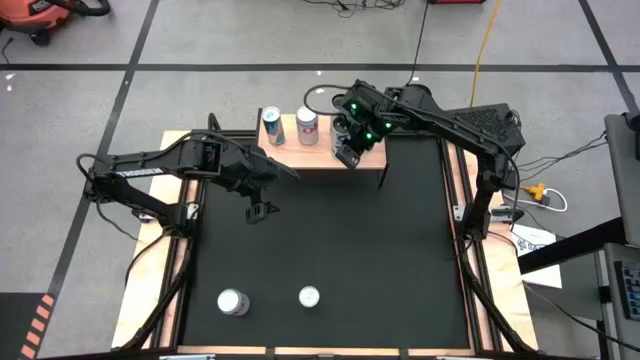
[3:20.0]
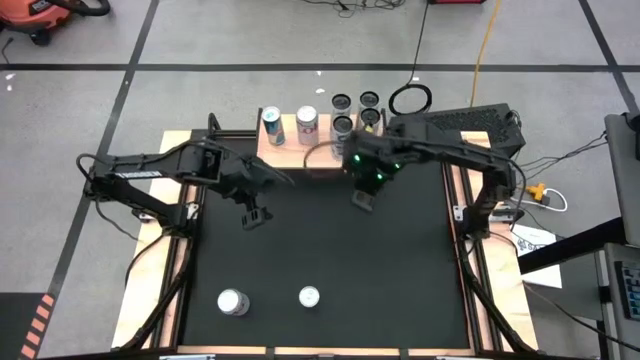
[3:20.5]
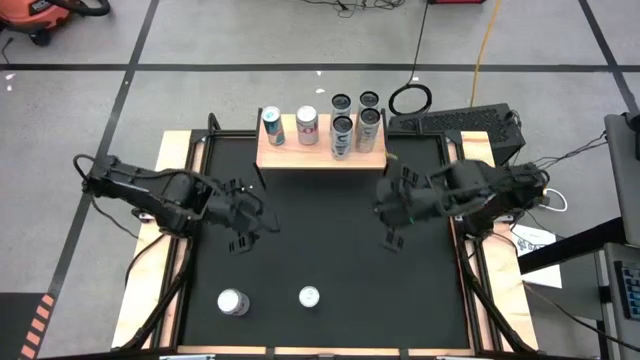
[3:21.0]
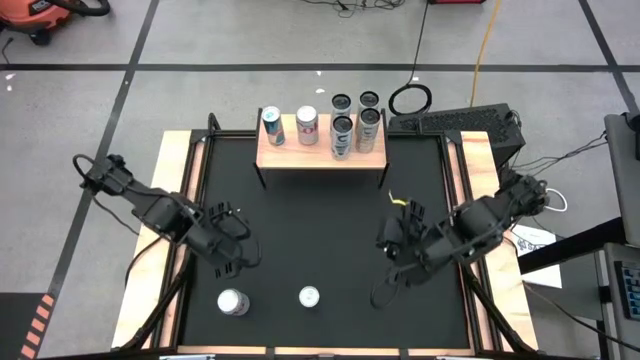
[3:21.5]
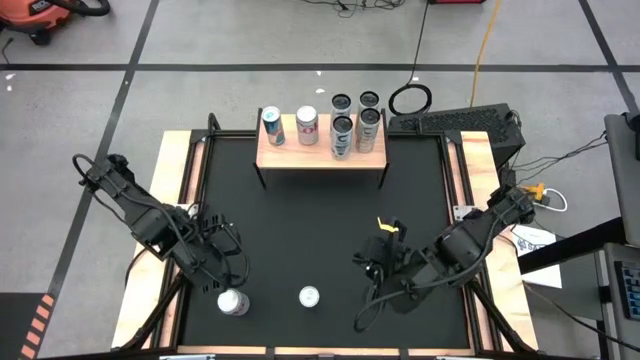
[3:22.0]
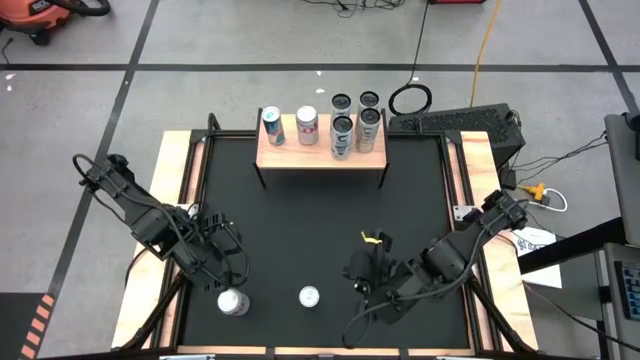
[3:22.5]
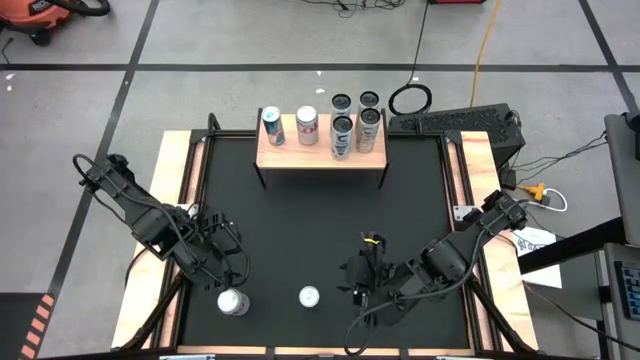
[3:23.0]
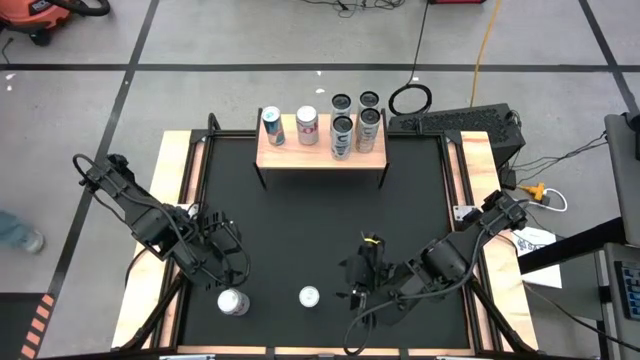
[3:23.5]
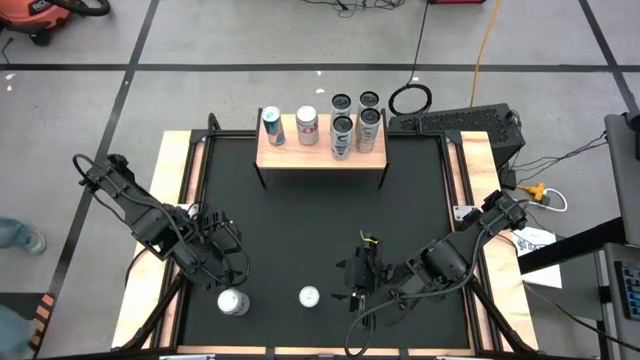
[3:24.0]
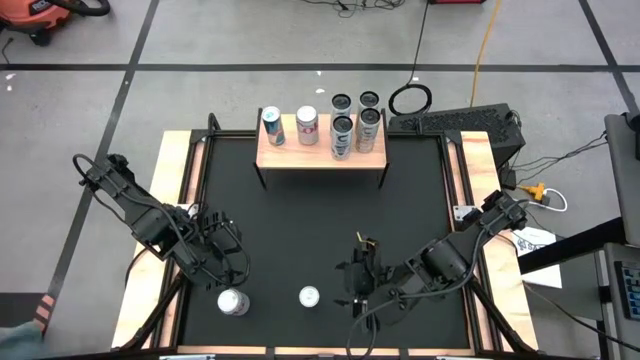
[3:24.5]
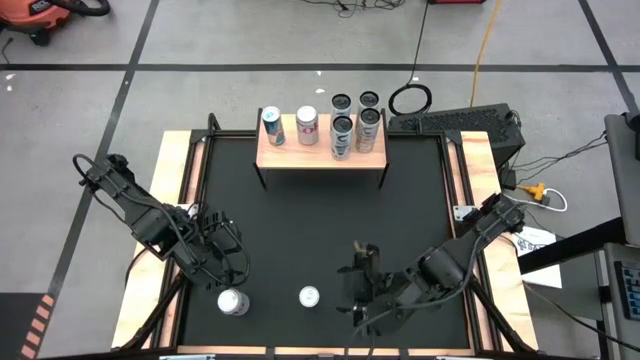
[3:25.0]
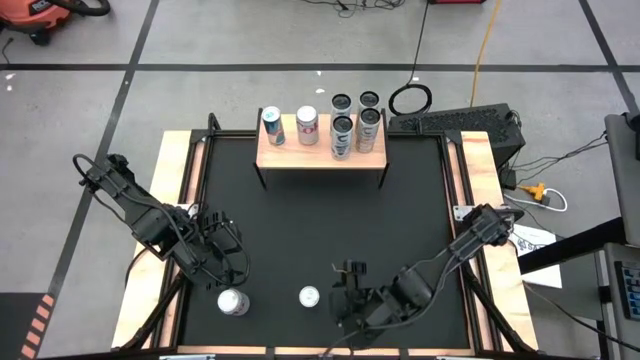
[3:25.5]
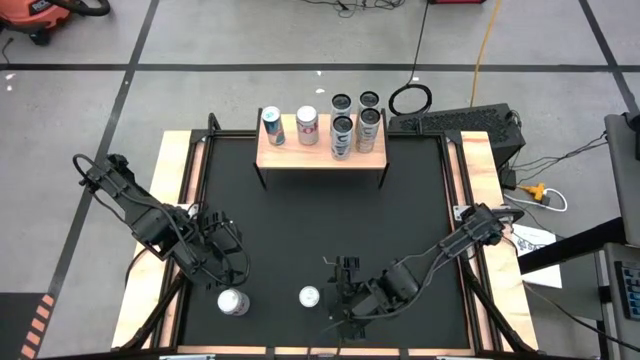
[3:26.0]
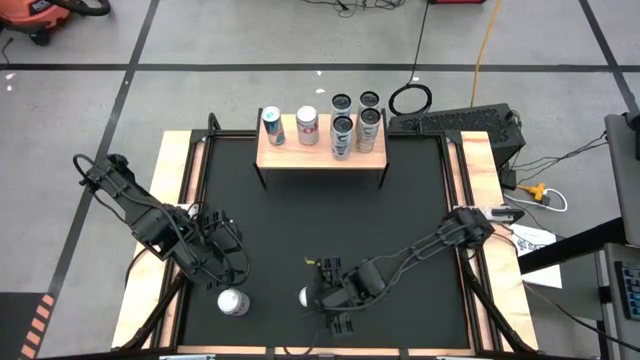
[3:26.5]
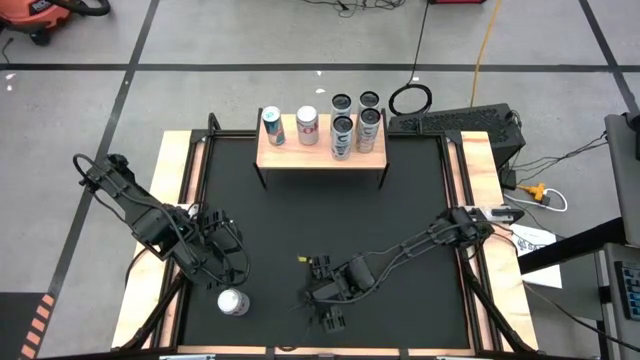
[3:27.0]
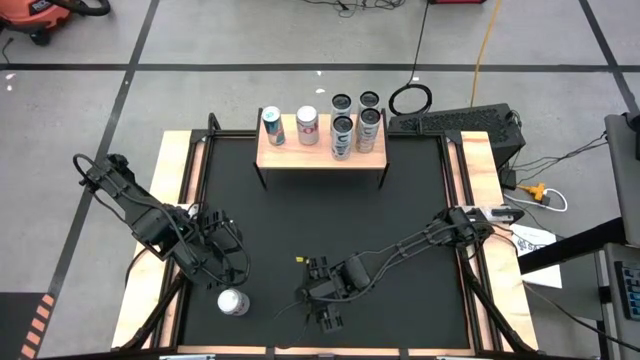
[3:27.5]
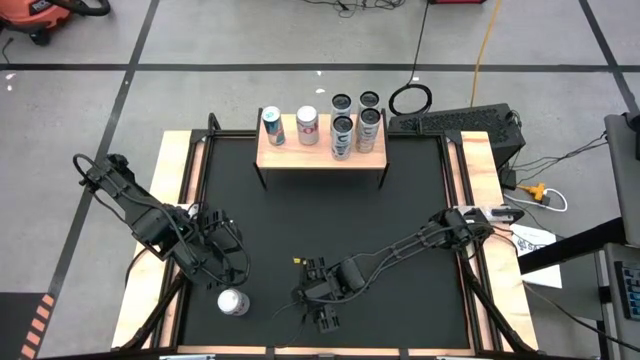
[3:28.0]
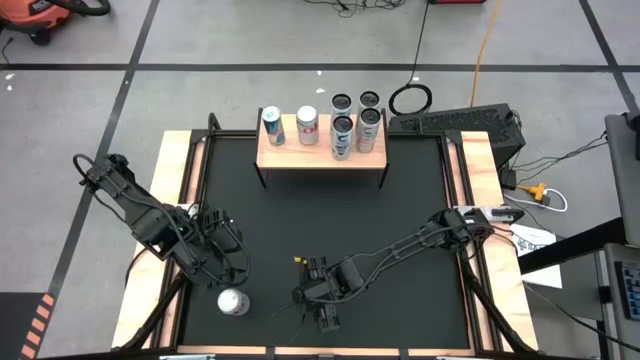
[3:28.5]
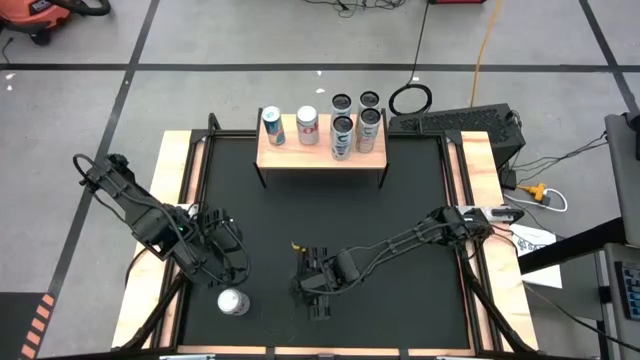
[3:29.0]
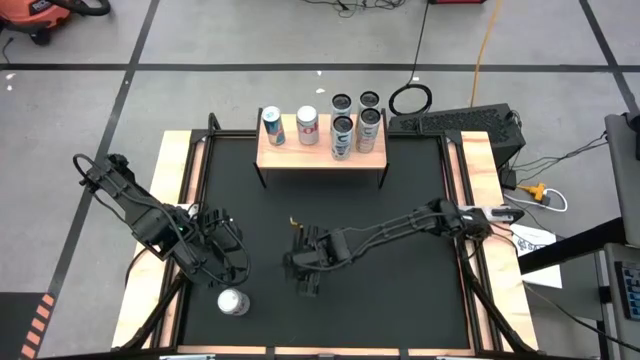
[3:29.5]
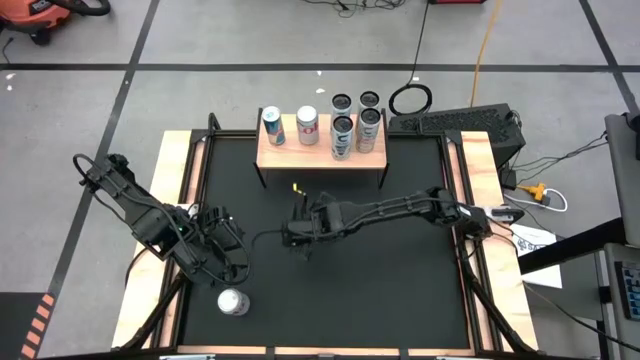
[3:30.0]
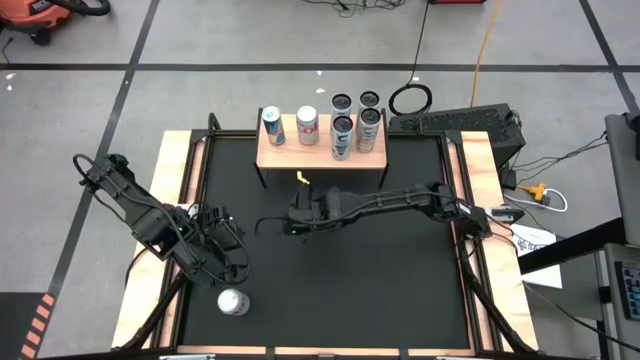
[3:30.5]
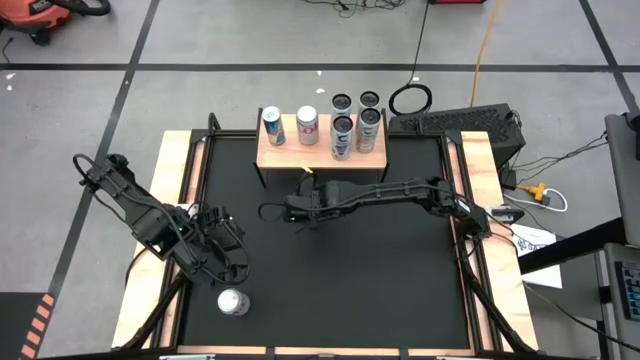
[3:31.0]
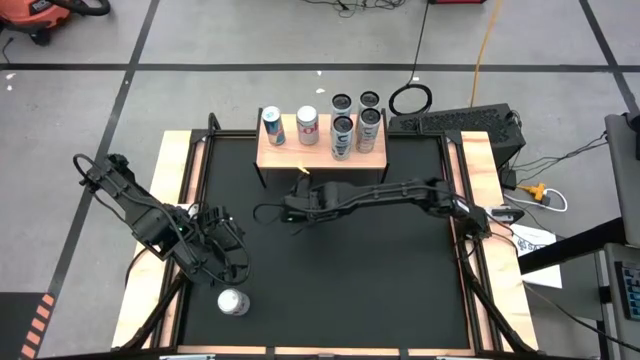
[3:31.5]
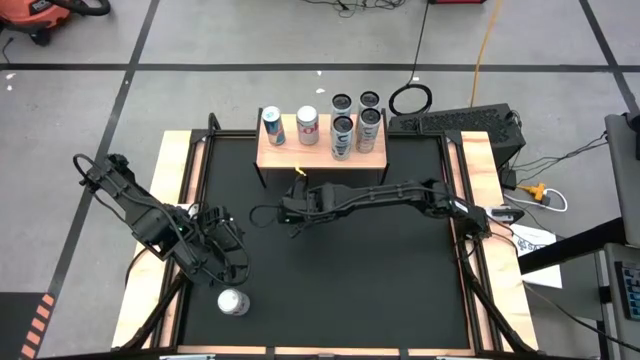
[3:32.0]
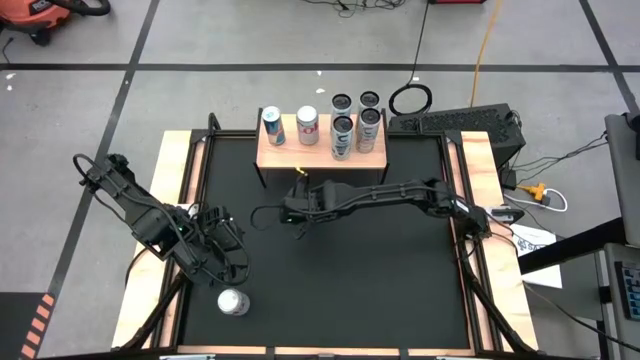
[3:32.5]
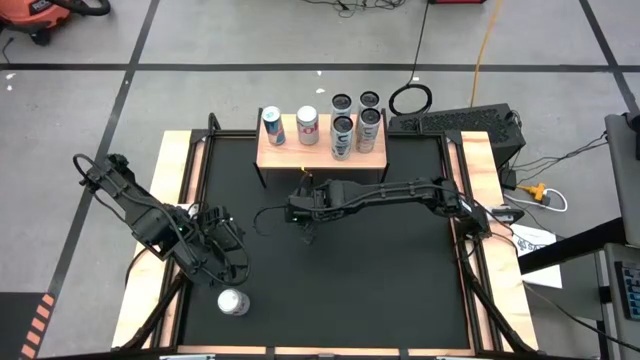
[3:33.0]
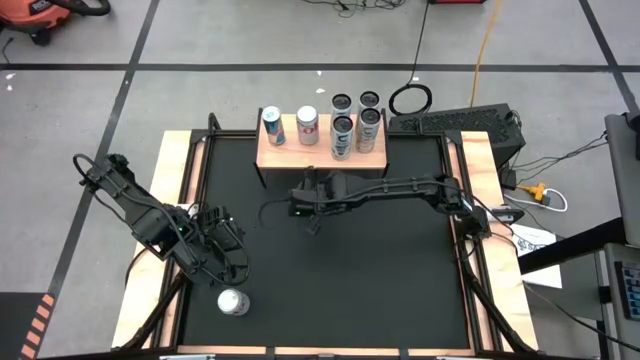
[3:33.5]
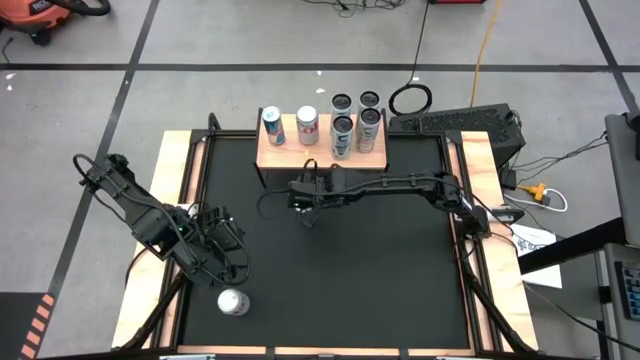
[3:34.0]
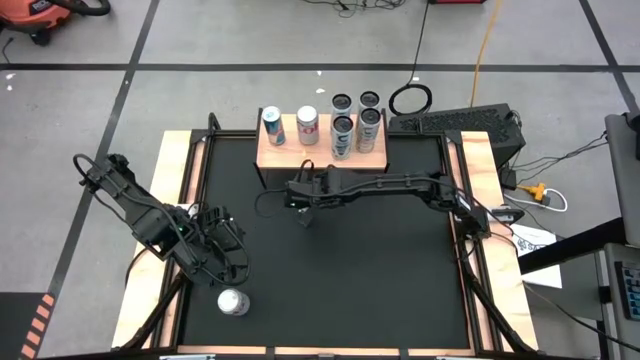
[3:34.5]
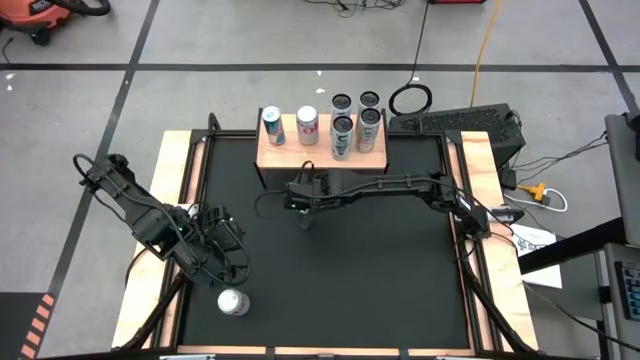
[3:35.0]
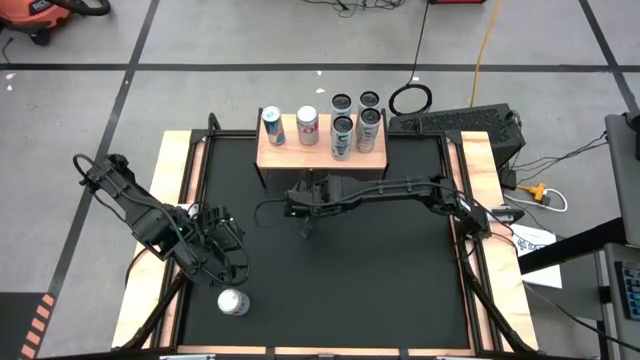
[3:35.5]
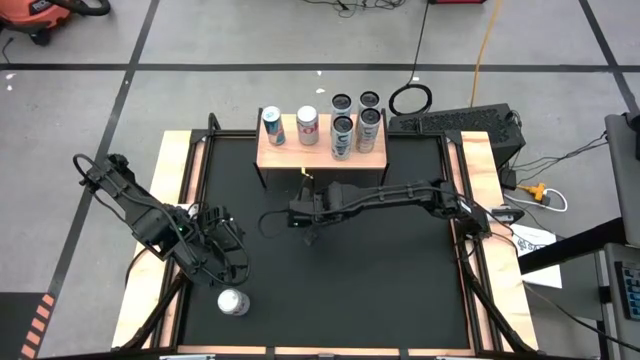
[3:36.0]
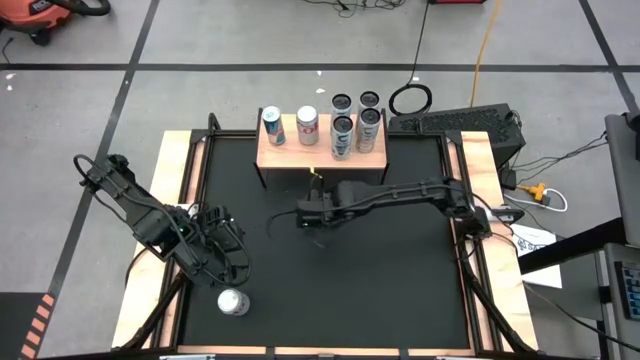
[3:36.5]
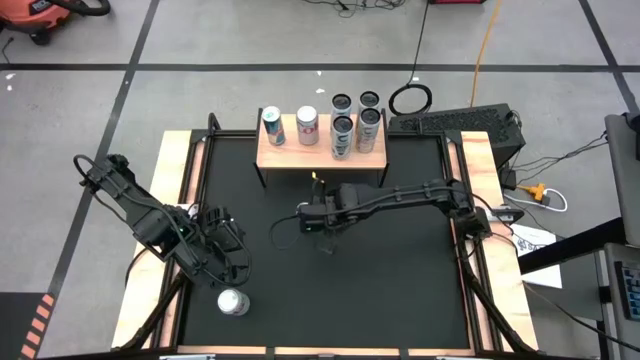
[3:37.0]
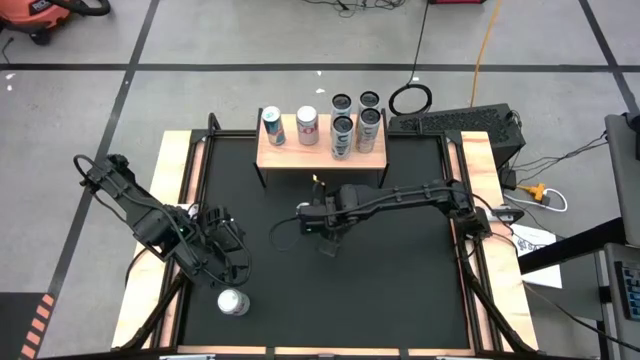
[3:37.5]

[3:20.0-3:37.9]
Task: Place canned beverage on shelf
Put the blue soda can on the shelf aligned with the other blue soda can

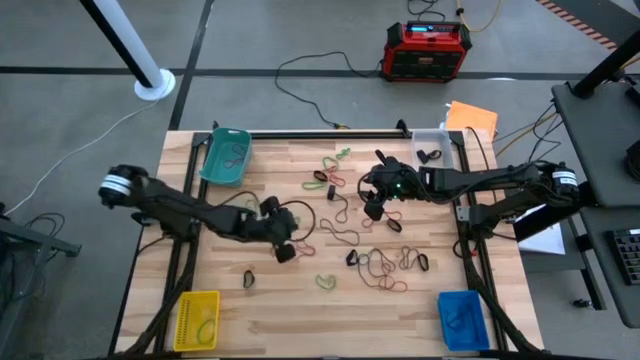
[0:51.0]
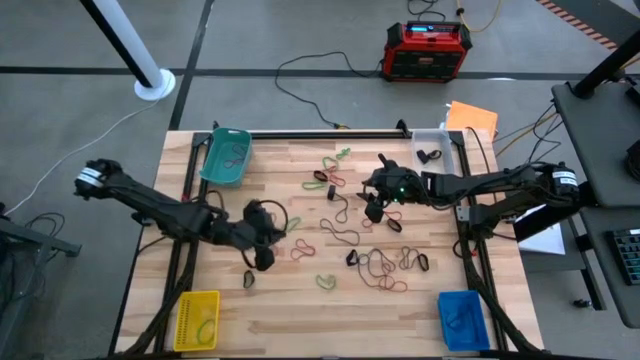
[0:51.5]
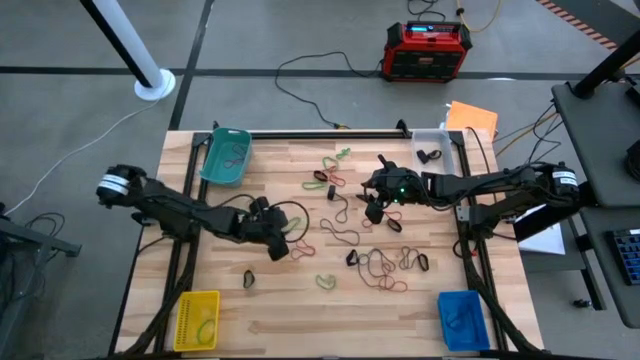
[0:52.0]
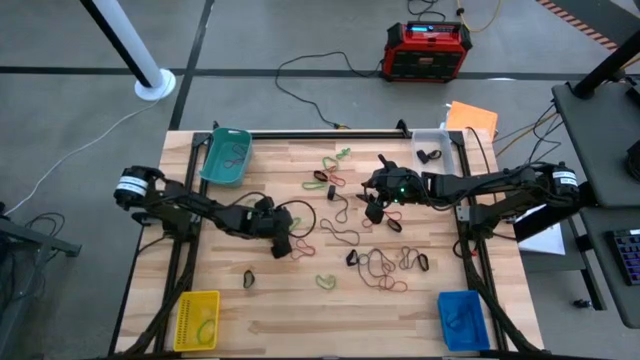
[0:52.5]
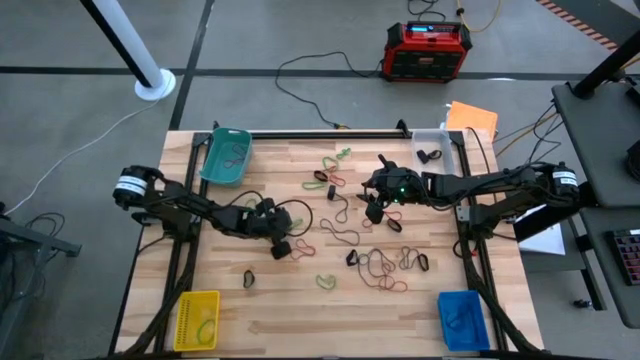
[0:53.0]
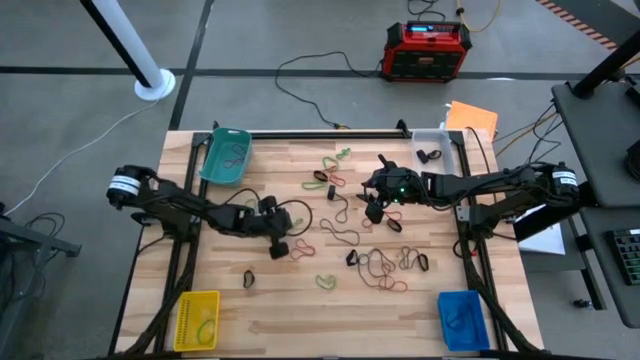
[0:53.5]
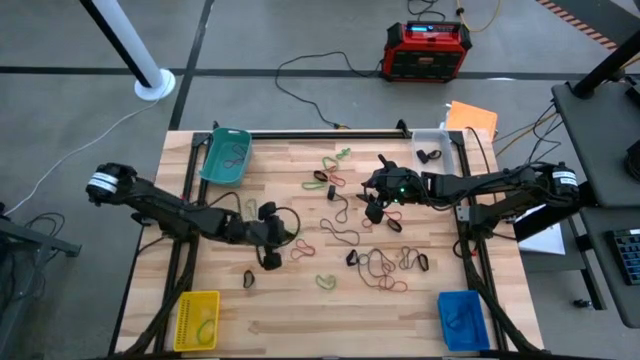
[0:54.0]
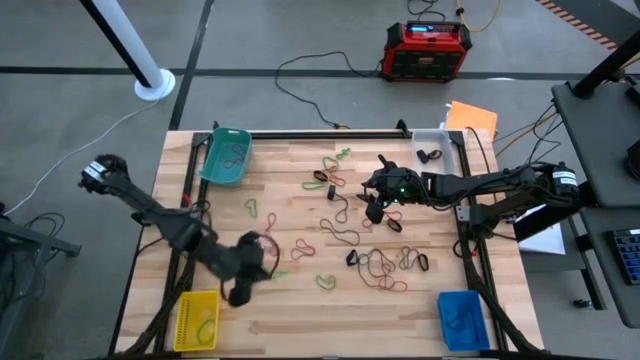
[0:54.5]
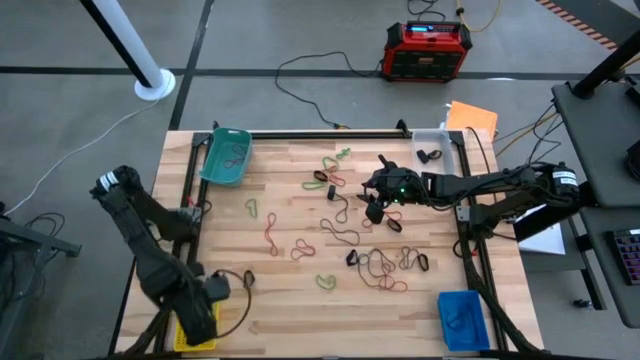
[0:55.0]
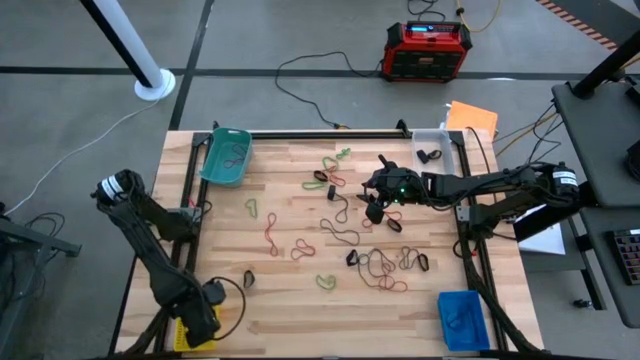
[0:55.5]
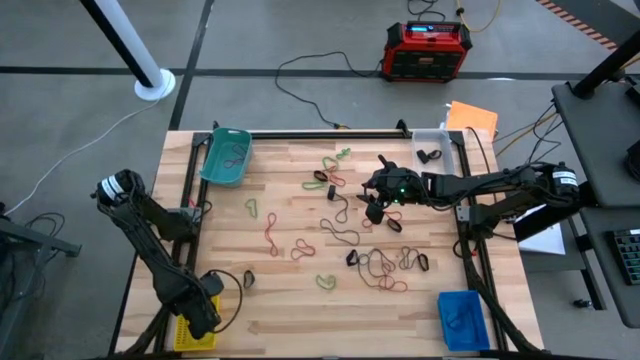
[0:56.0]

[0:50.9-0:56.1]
Task: Sort rubber bands into baskets
Put the green rubber band into the yellow bin
